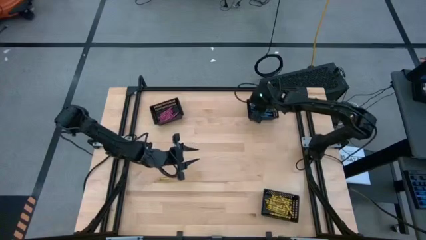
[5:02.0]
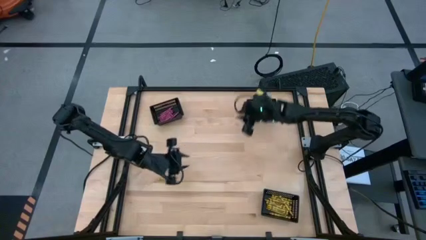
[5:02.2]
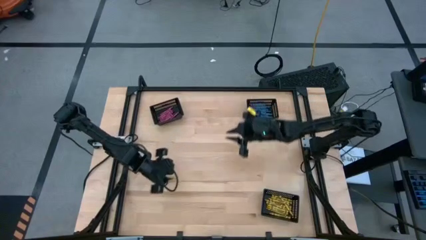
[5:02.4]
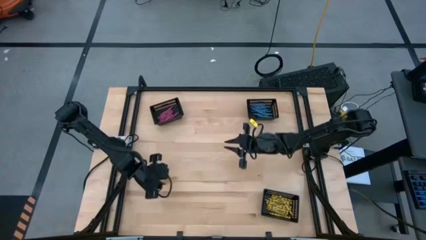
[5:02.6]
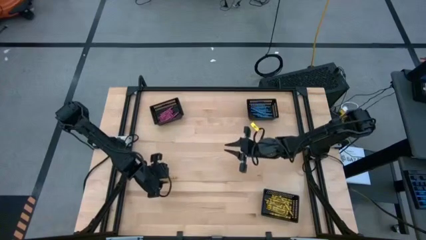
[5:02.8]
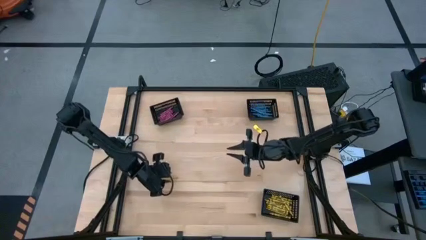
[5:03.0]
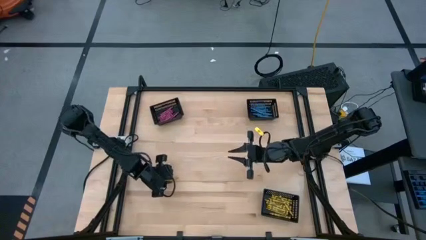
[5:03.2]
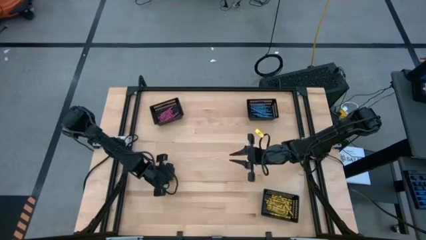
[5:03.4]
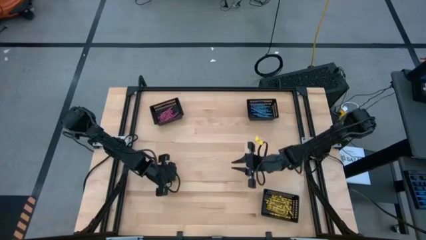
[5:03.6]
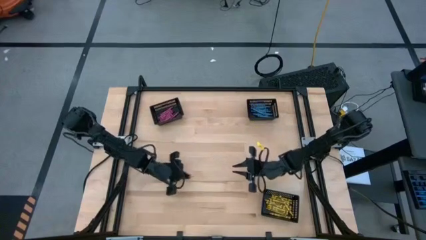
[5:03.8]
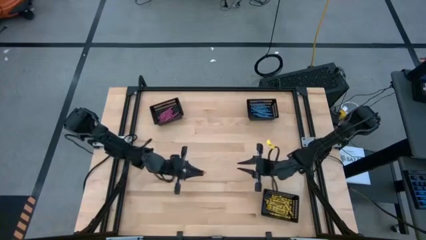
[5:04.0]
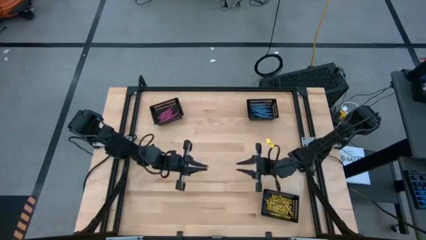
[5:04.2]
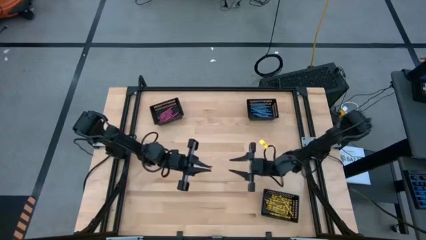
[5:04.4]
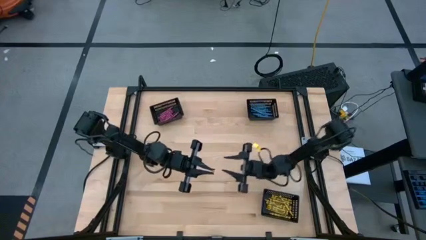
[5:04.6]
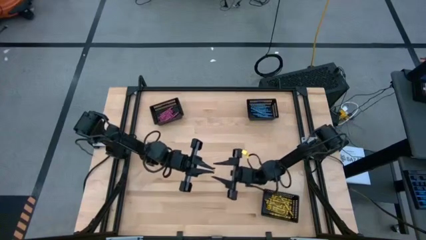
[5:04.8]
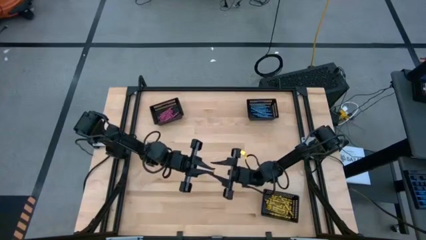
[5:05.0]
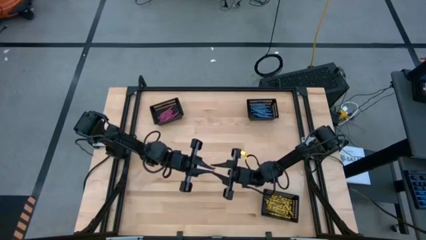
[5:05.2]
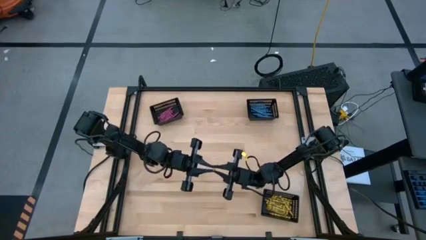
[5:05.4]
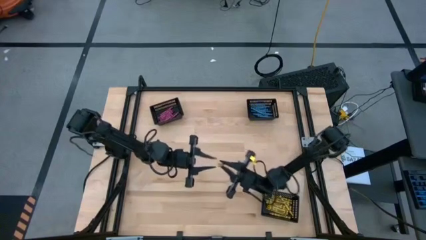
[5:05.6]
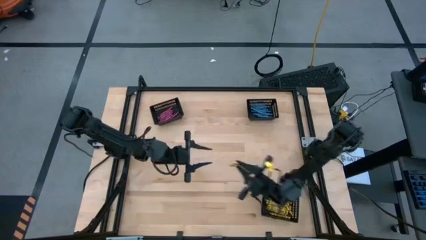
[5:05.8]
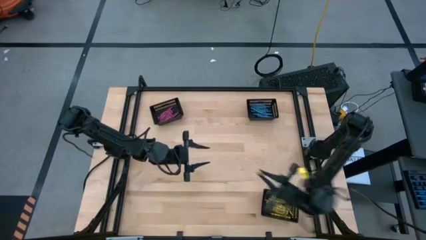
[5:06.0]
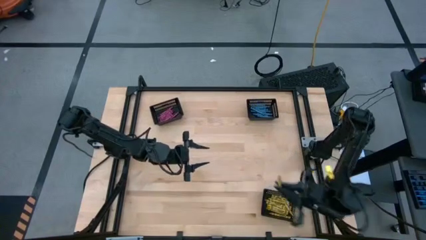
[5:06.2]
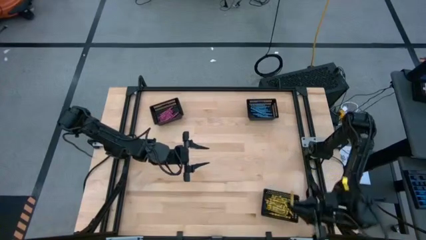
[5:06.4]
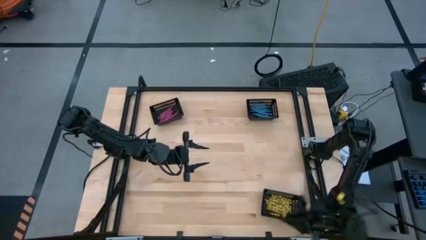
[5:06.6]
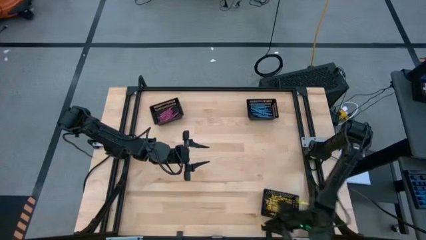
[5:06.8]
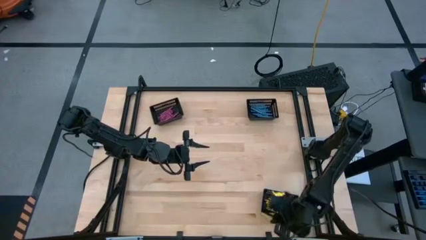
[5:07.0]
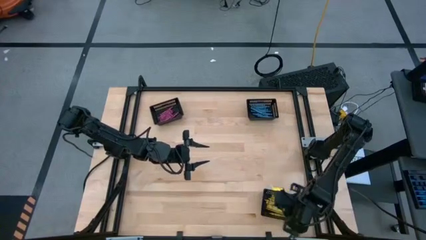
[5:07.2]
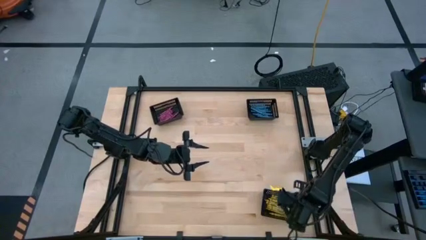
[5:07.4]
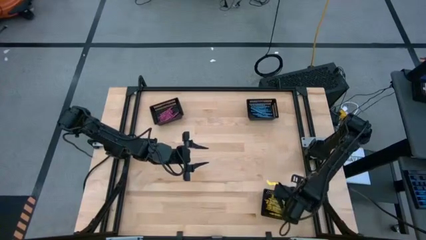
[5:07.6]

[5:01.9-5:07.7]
Task: Sort crayons
Put the yellow crayon into the bottom black bin

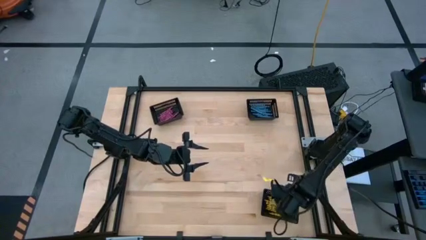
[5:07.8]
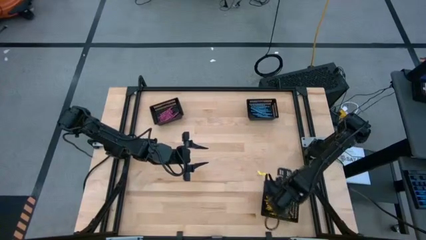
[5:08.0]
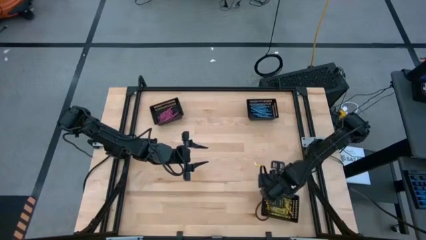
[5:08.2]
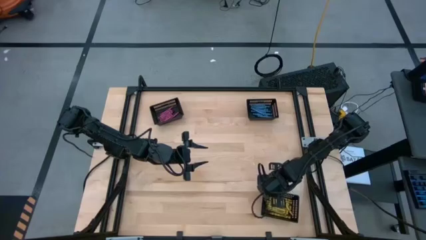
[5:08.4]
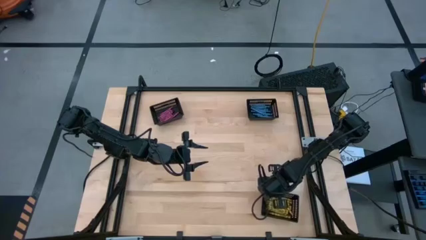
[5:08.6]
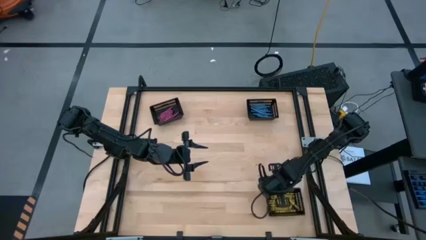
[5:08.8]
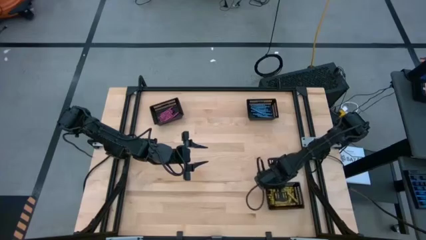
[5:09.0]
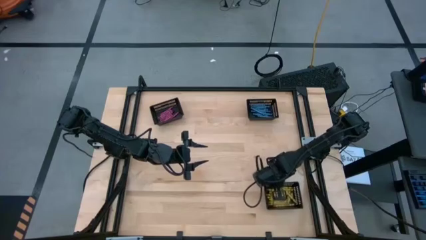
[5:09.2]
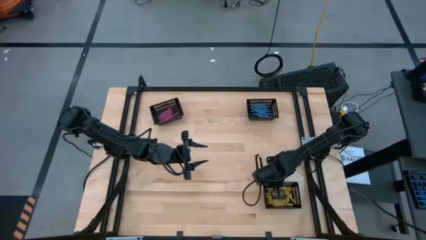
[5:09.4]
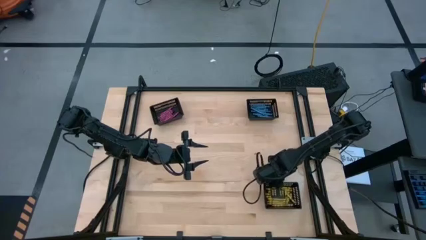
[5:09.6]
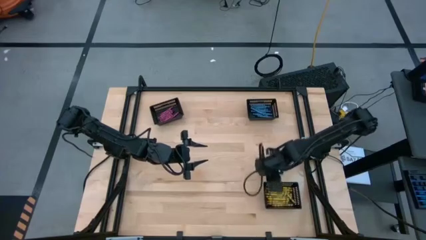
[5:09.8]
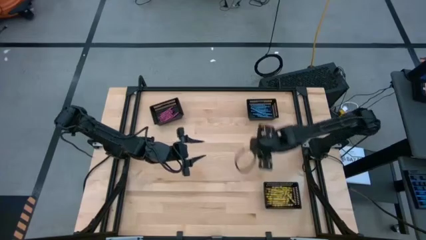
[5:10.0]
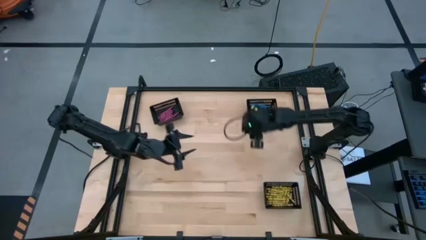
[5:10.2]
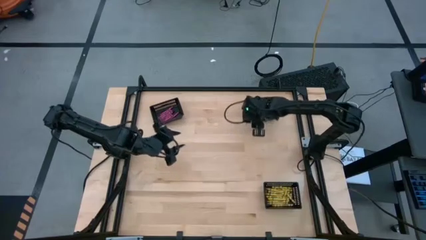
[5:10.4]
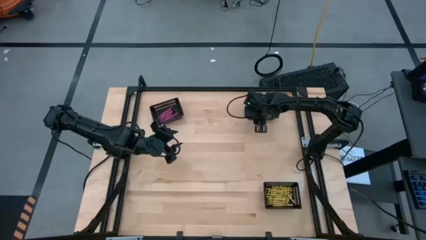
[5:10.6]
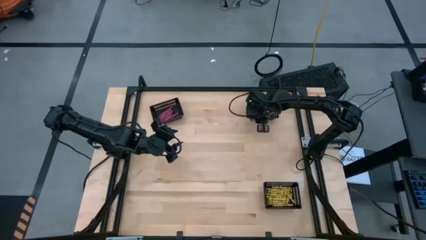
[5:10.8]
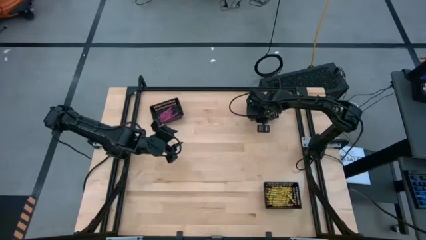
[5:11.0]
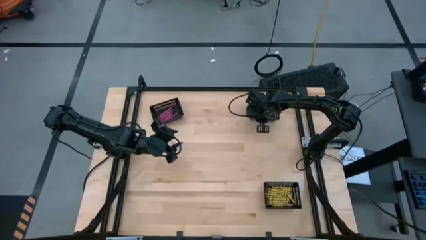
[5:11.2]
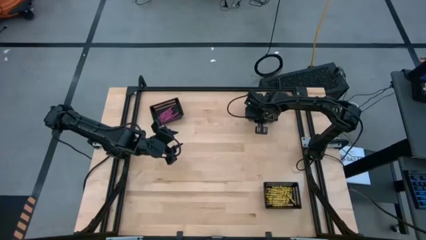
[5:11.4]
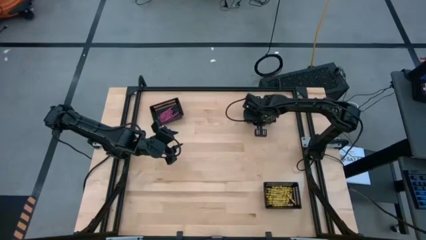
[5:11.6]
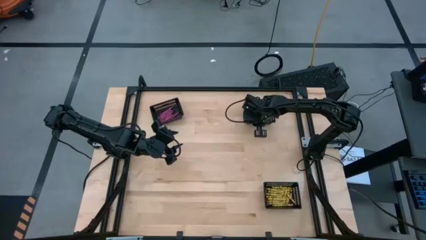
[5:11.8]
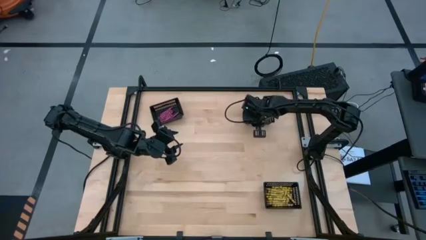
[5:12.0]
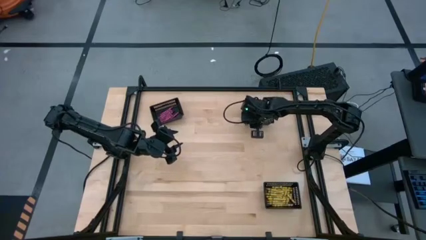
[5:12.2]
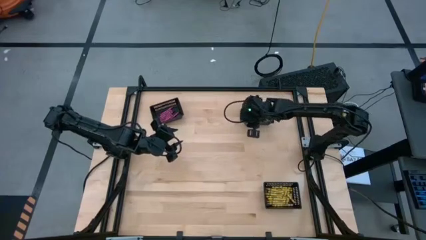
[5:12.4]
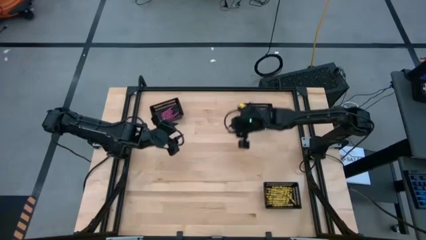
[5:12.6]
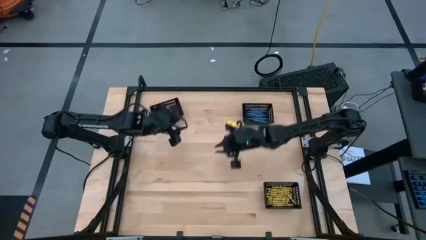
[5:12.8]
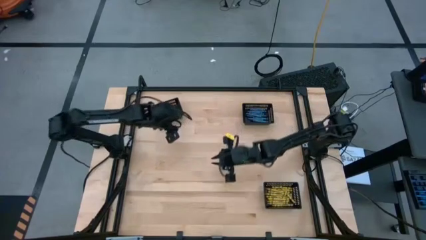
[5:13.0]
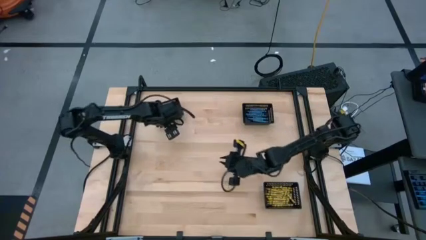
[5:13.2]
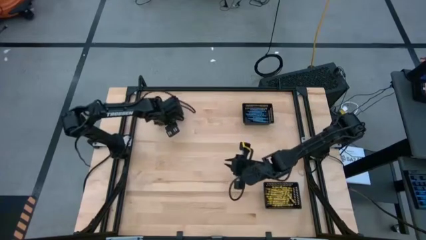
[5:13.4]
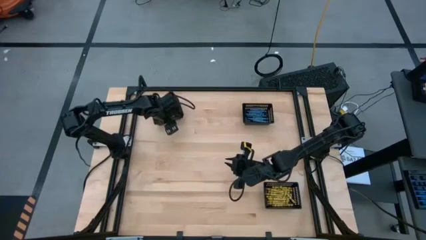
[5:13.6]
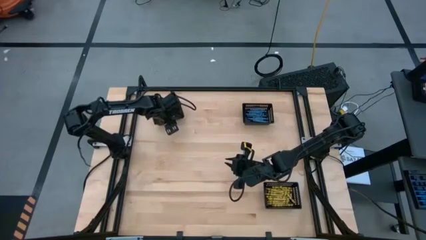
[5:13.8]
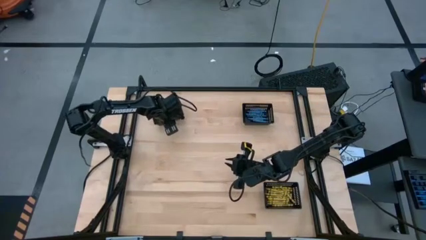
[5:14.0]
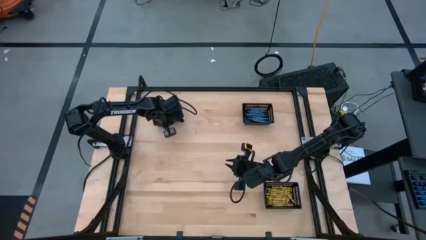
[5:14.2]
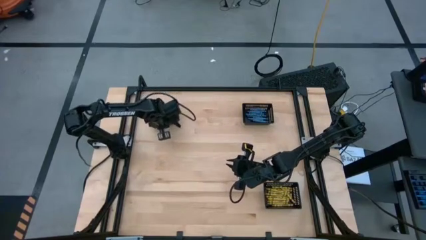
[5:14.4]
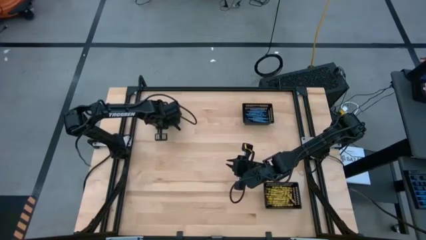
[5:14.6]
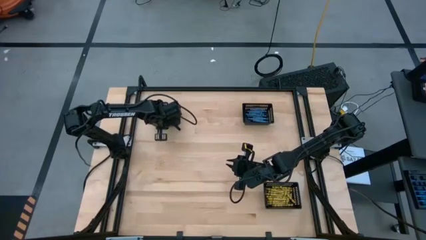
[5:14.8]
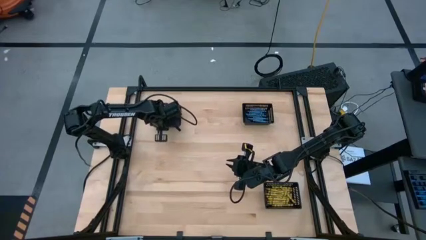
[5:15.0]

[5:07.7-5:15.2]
Adjust the black bins
